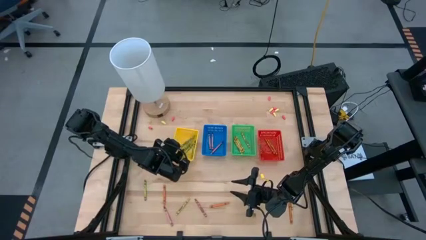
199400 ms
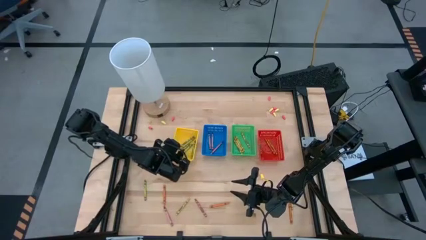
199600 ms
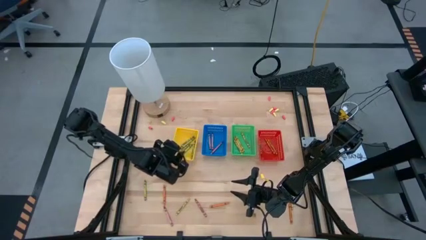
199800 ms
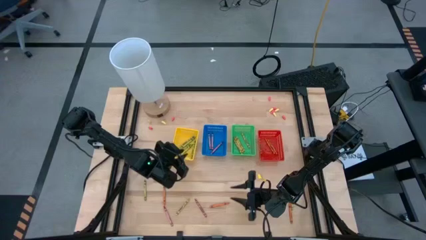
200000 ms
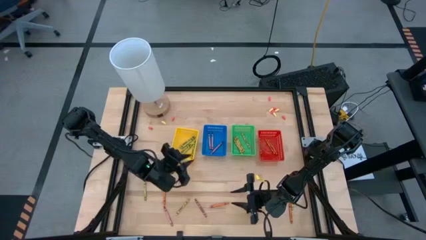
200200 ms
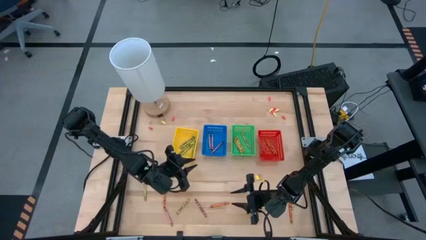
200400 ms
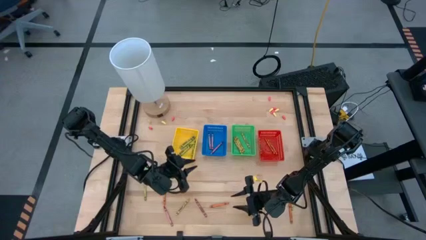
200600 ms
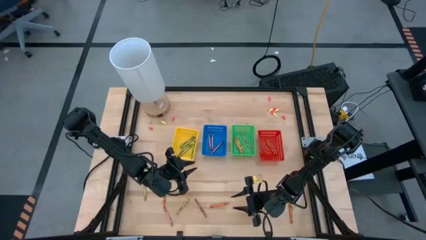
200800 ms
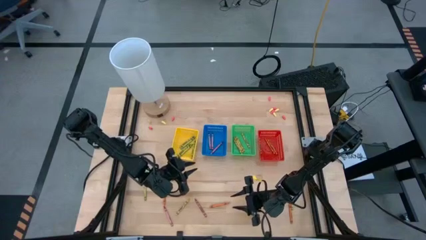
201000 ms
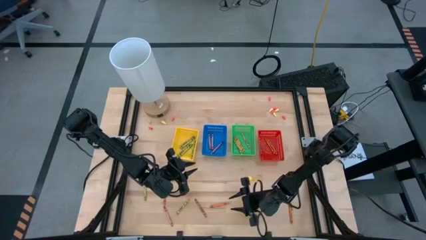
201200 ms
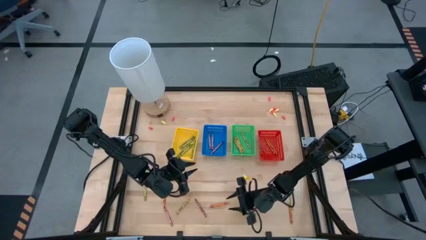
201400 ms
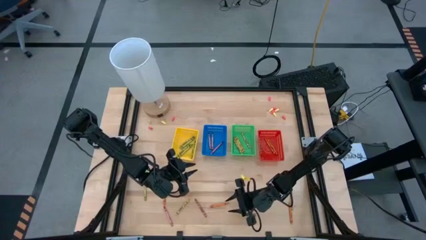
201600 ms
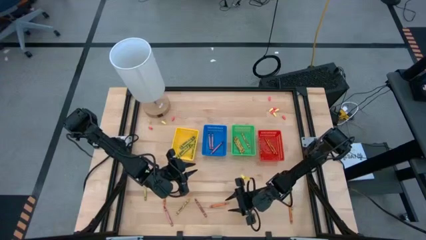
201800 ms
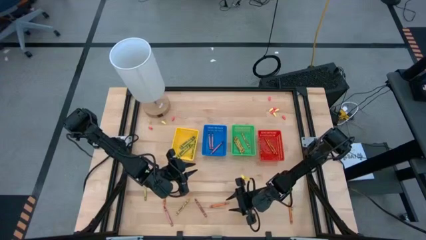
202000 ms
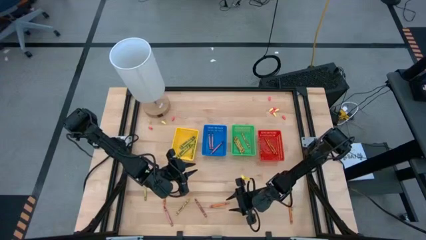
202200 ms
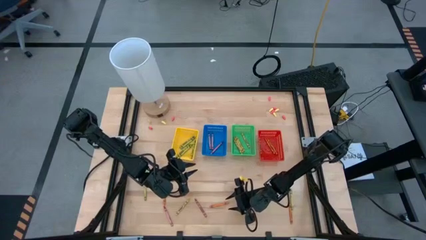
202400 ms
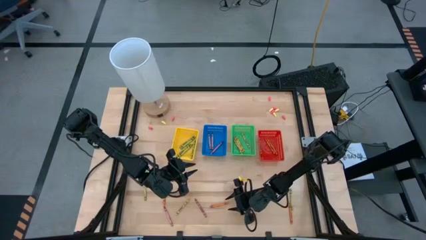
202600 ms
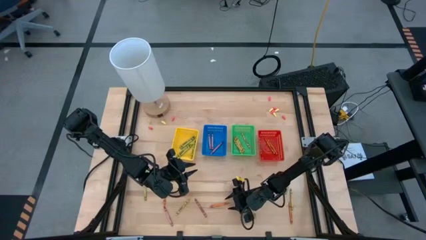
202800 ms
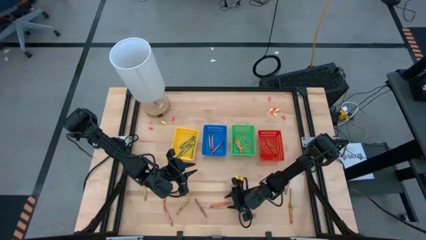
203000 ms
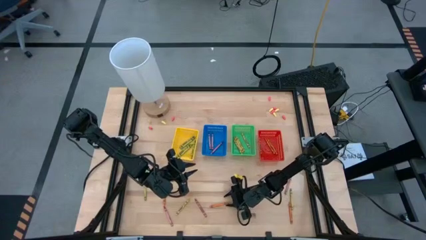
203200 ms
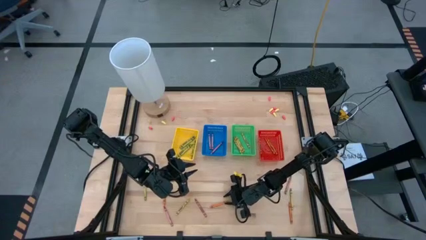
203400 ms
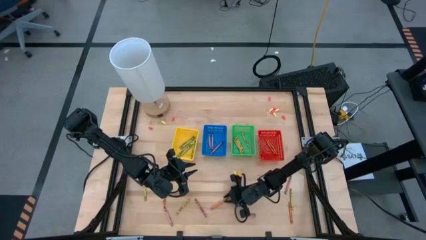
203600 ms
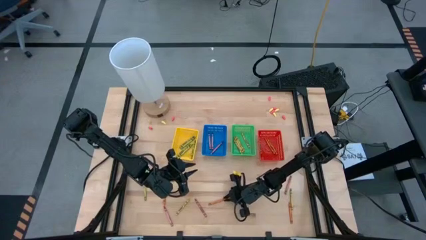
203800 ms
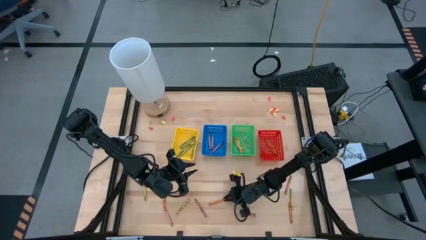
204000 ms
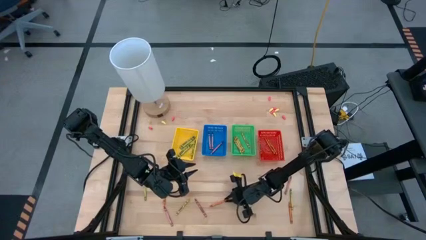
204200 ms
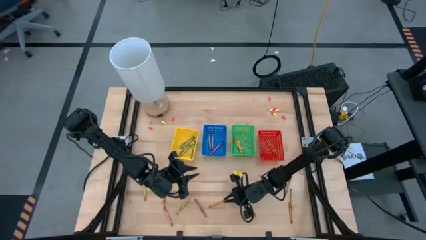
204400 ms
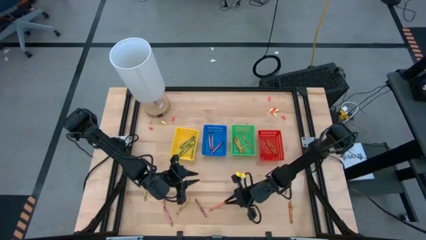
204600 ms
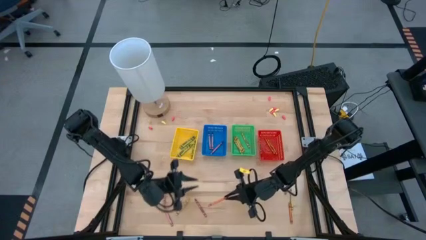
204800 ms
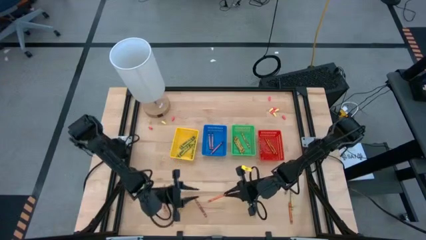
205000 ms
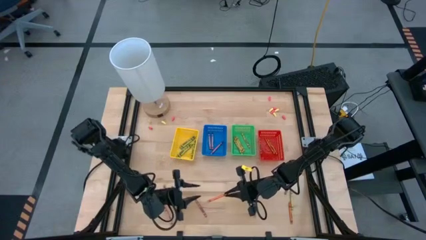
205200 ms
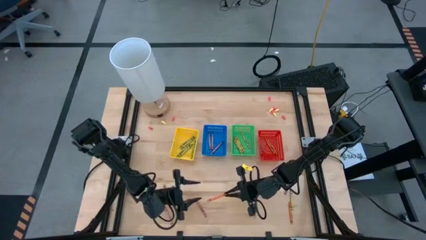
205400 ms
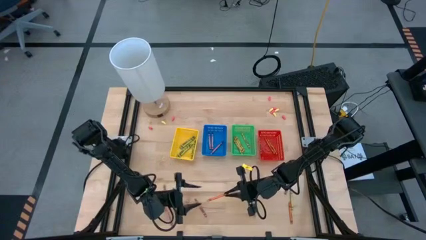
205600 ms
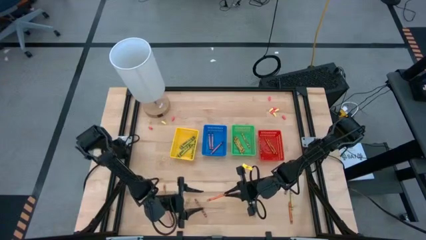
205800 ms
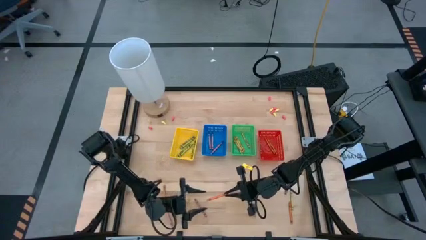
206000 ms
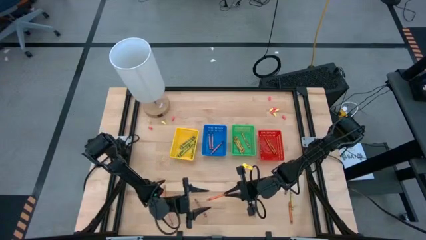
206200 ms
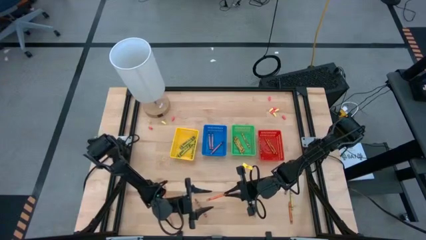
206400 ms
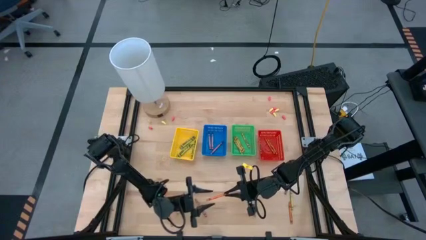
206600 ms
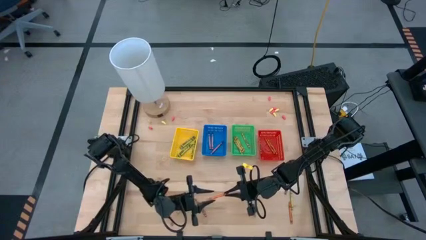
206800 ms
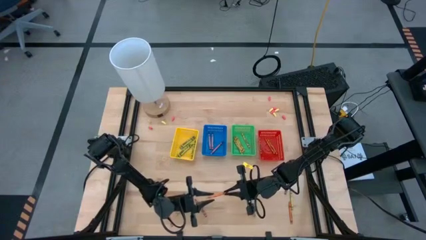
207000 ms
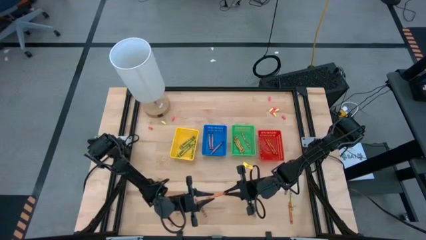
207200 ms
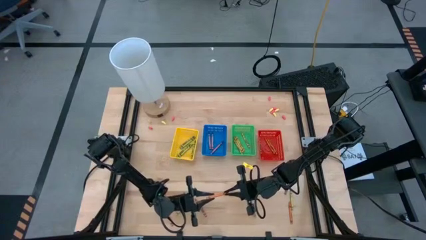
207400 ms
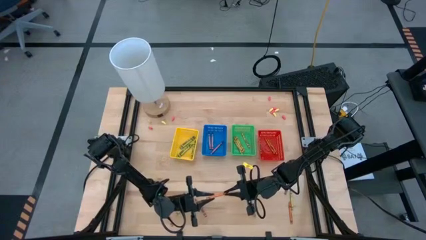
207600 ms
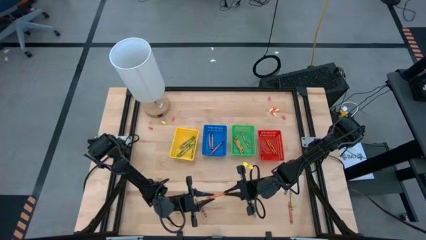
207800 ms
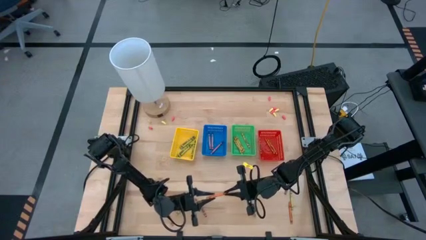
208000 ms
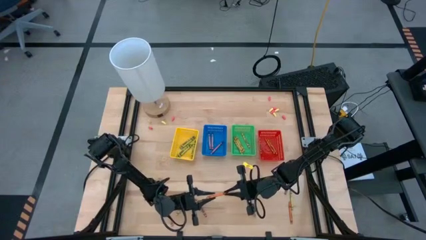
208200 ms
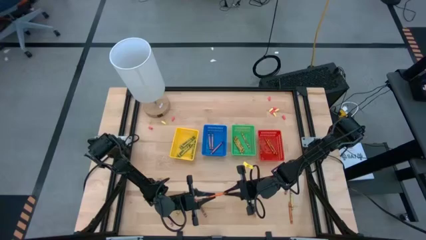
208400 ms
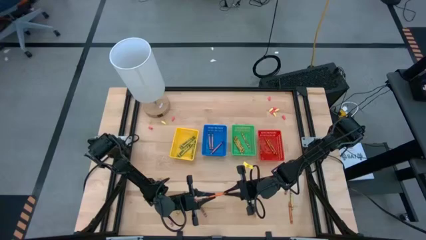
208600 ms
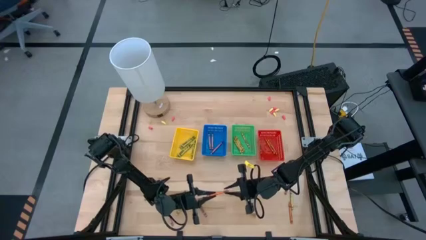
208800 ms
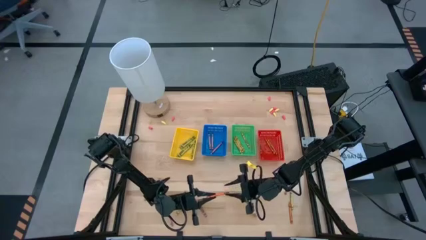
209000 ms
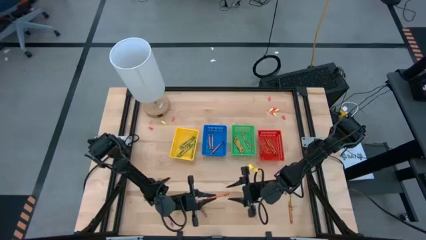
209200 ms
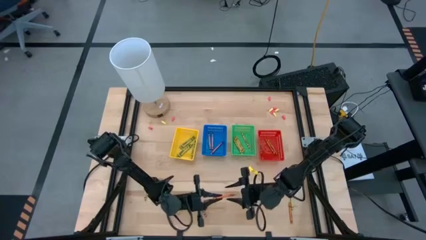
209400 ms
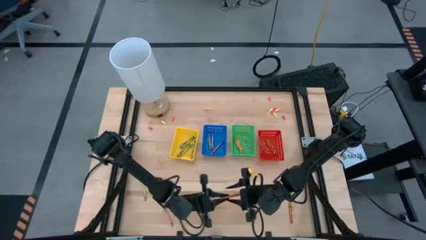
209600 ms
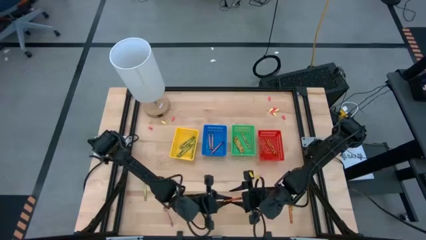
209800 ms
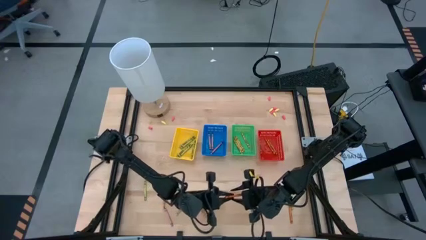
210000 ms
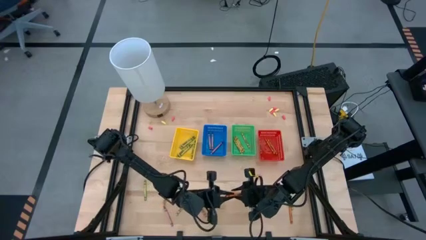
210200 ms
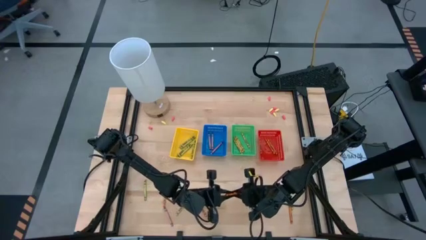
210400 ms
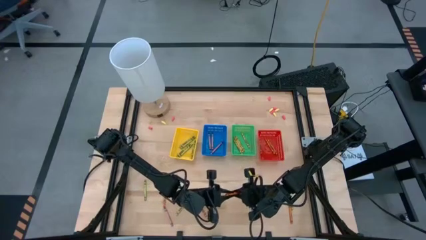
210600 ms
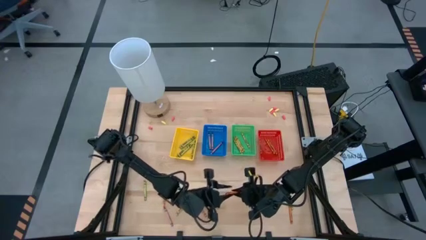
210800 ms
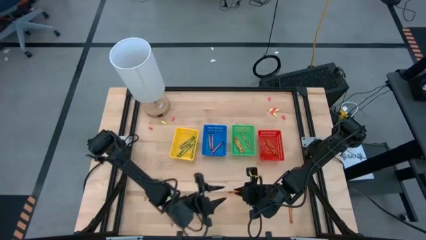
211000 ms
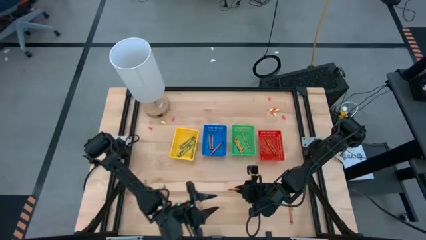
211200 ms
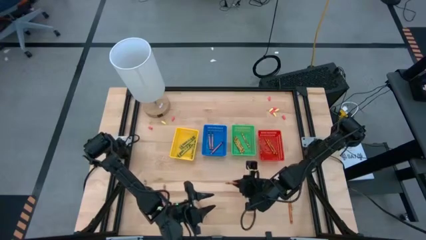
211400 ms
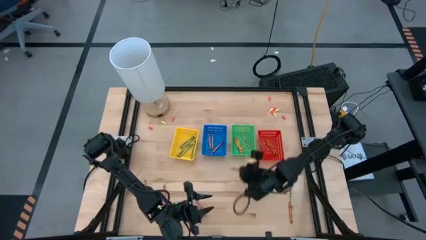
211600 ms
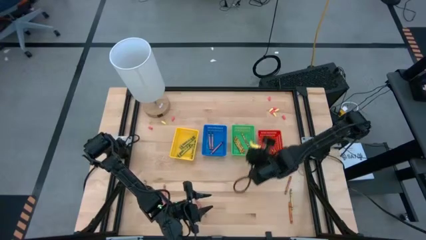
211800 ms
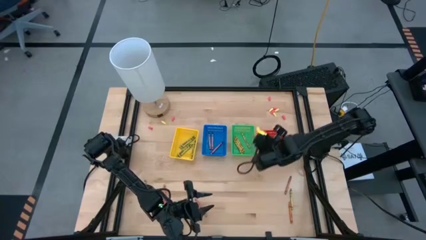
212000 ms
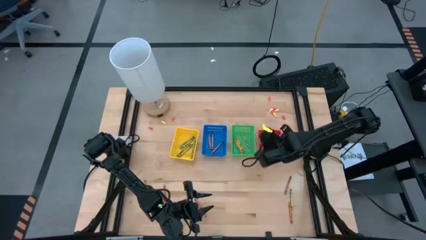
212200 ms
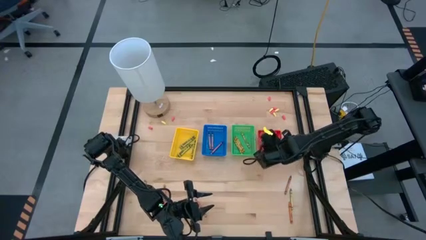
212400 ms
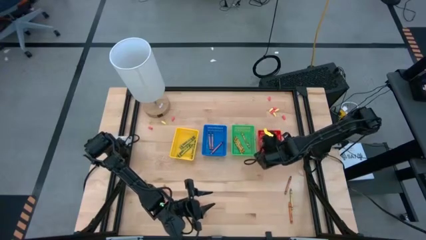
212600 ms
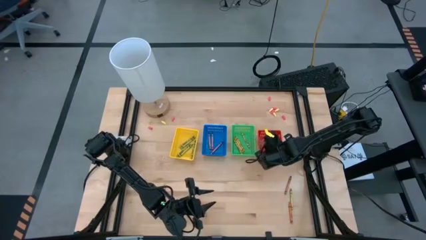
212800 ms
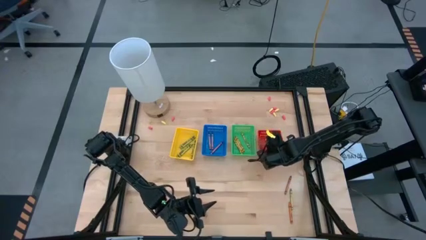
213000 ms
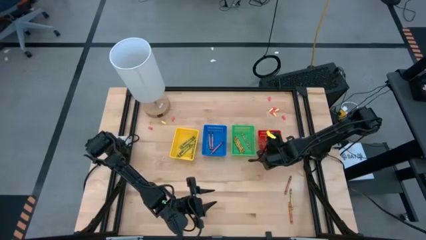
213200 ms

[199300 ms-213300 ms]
Task: Sort crayons
Put the orange crayon into the red bin

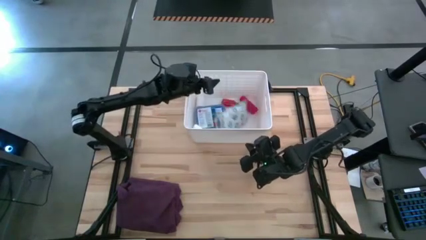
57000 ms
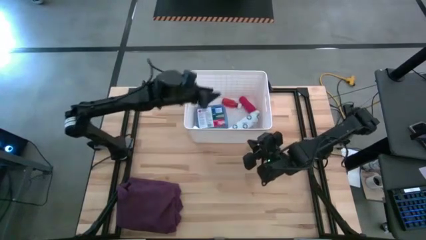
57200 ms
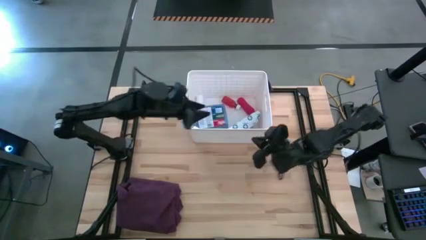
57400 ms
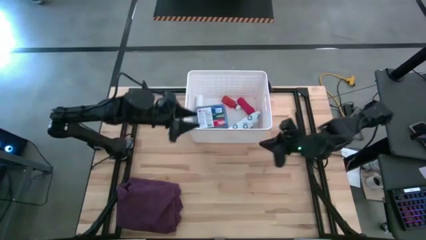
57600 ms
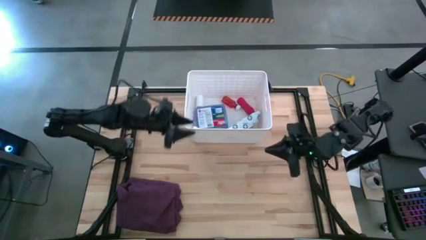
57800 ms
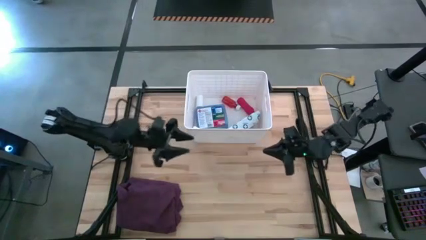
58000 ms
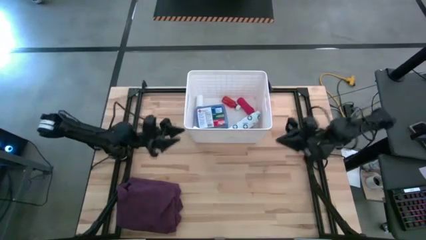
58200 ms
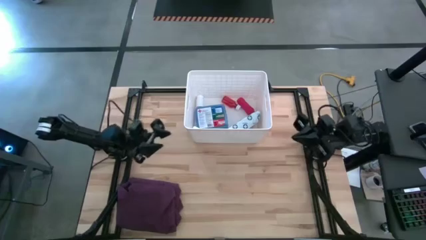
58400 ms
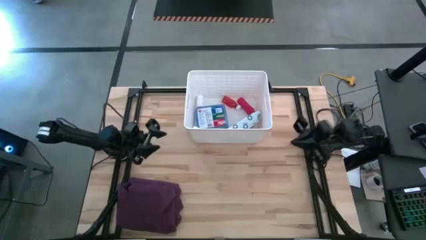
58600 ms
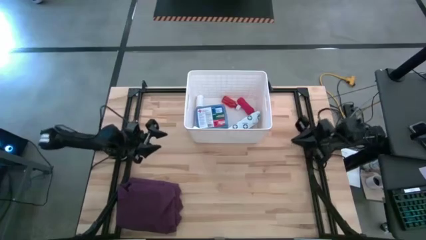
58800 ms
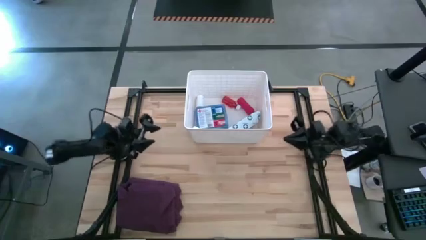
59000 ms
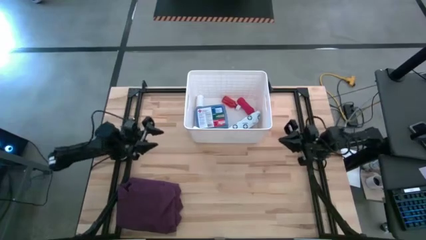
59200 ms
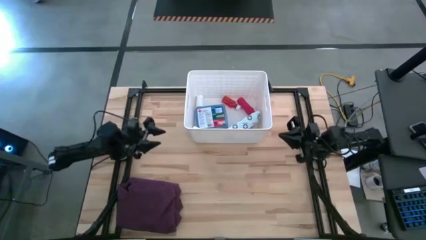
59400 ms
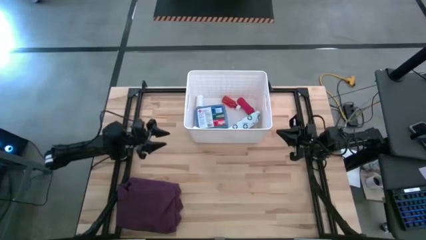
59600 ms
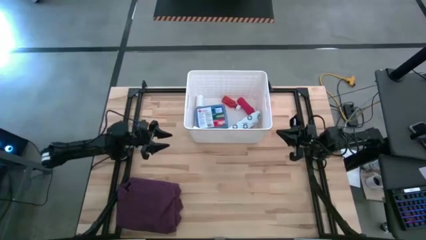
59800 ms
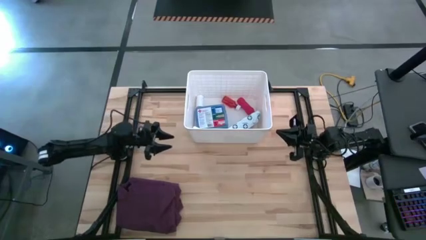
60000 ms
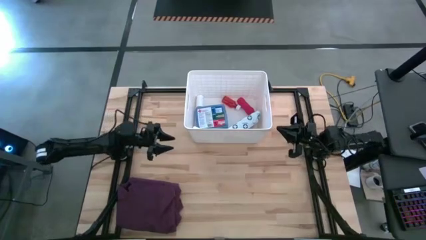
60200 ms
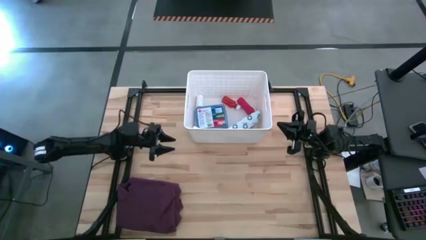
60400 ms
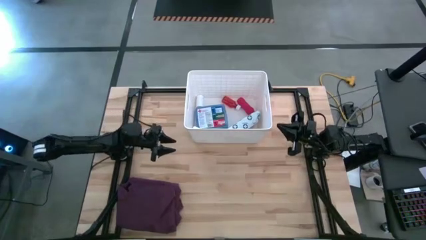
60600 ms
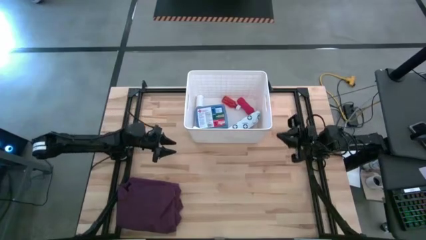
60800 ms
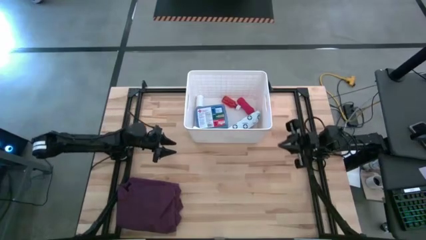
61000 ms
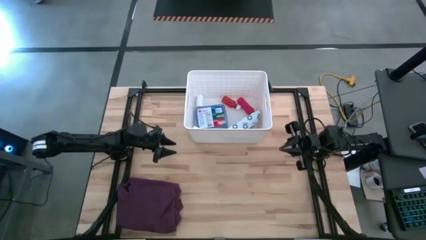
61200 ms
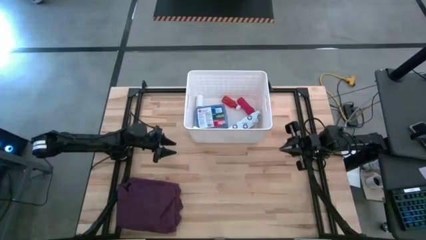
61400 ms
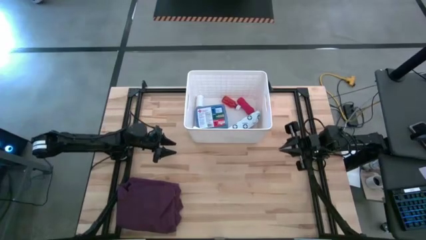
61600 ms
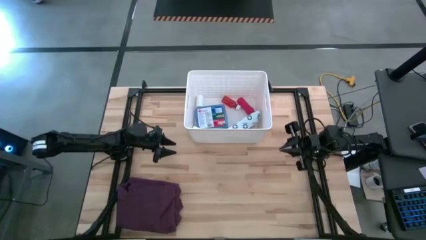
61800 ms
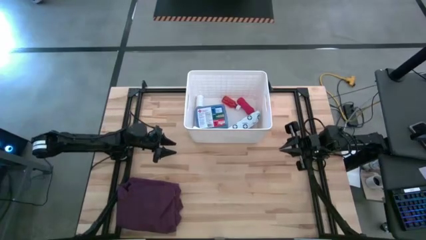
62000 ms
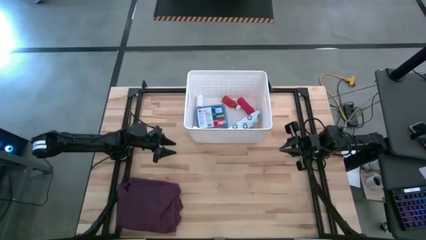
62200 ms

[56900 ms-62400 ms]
Task: Pick & place medical supplies in basket/bin
Return to Home Position
